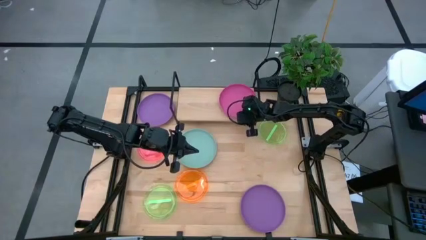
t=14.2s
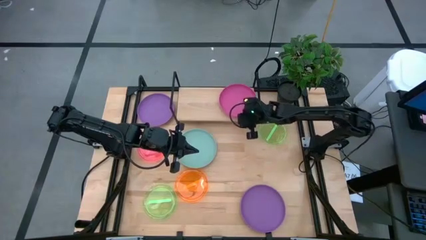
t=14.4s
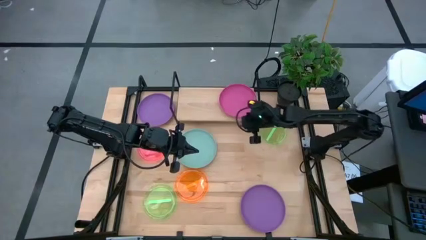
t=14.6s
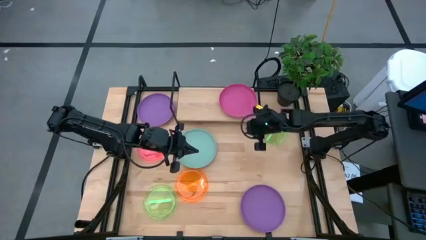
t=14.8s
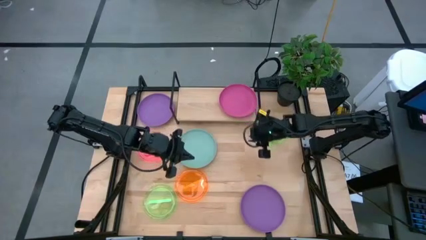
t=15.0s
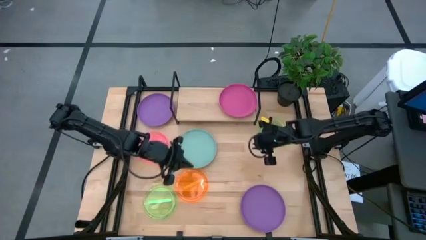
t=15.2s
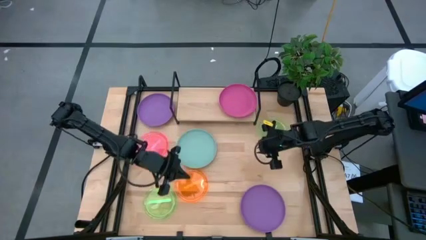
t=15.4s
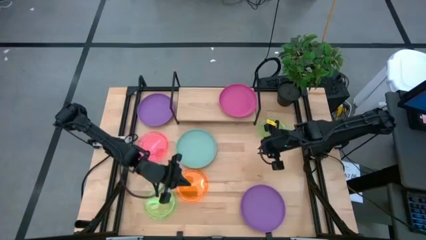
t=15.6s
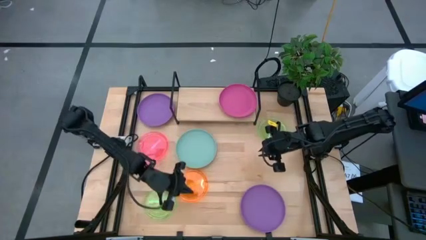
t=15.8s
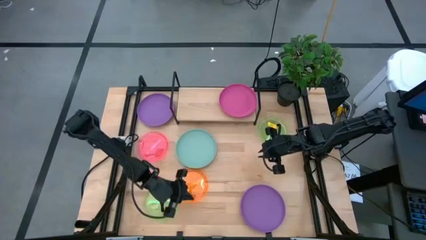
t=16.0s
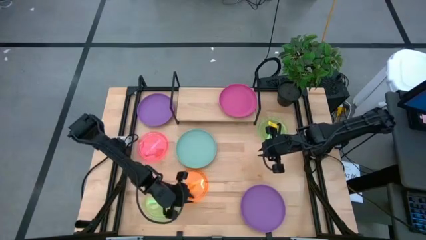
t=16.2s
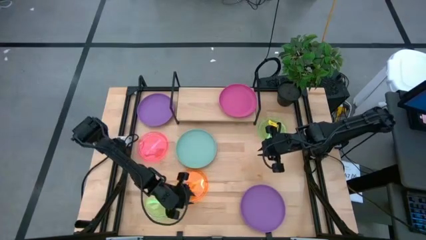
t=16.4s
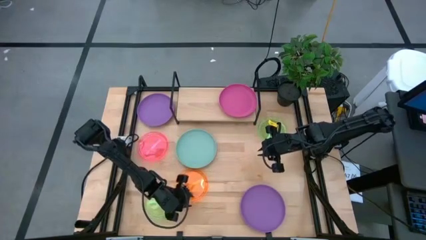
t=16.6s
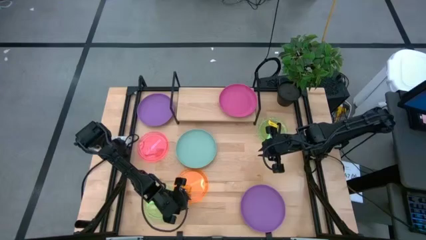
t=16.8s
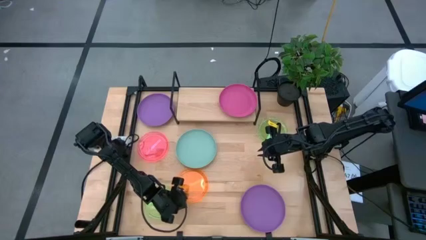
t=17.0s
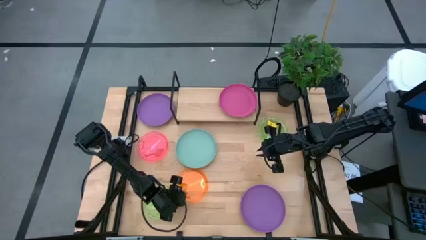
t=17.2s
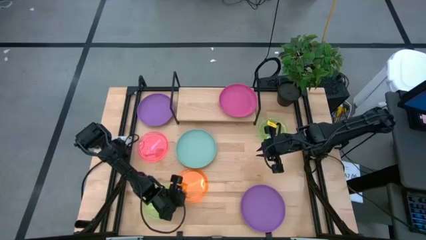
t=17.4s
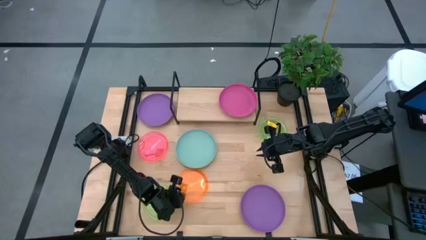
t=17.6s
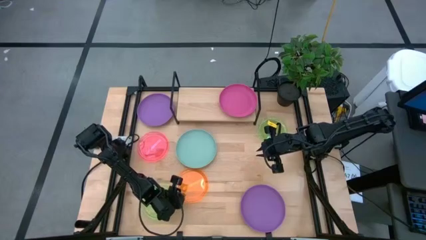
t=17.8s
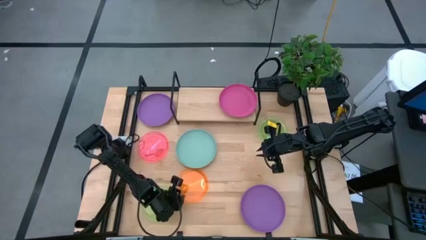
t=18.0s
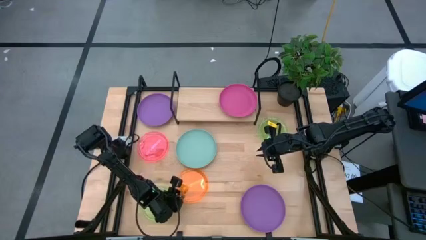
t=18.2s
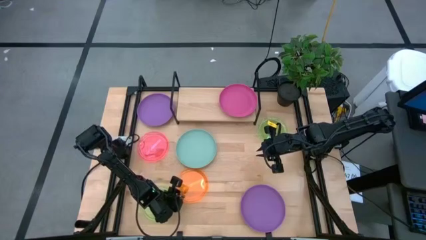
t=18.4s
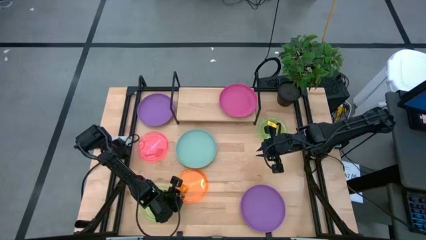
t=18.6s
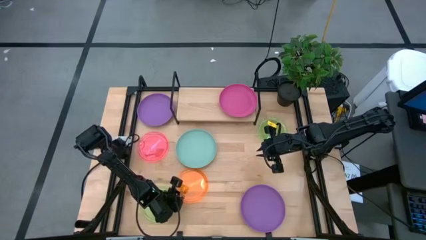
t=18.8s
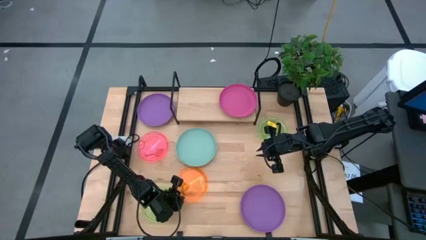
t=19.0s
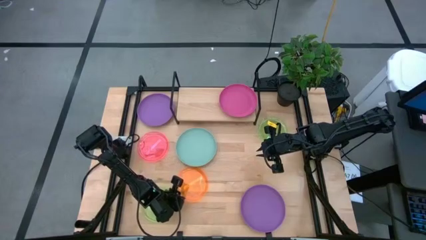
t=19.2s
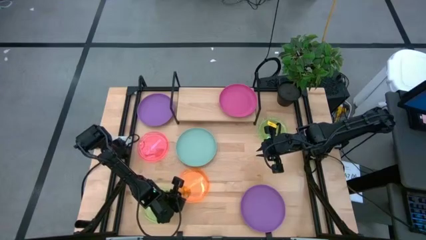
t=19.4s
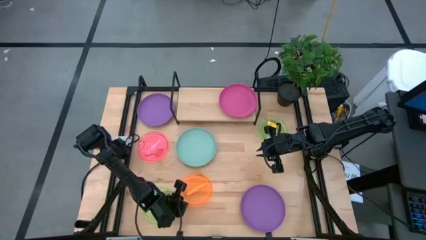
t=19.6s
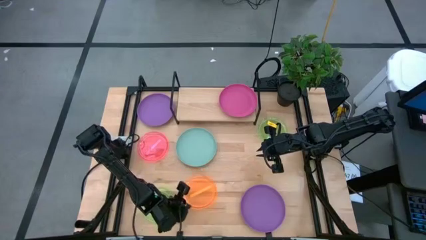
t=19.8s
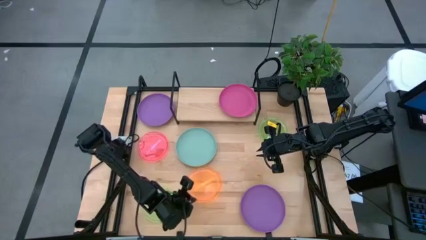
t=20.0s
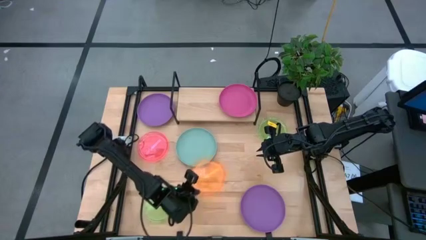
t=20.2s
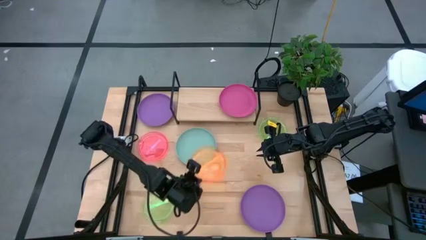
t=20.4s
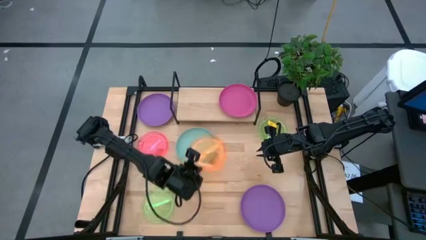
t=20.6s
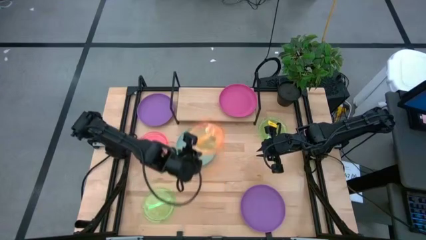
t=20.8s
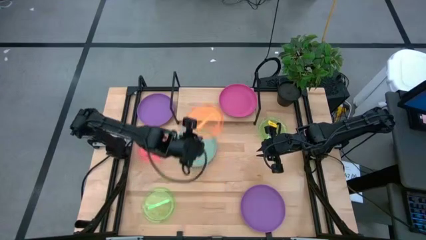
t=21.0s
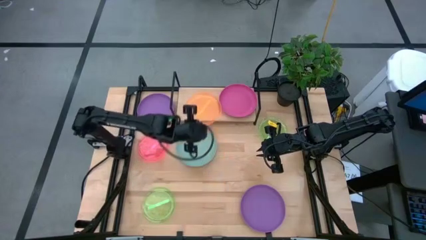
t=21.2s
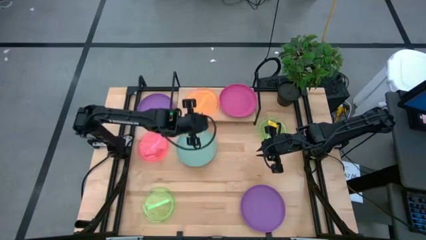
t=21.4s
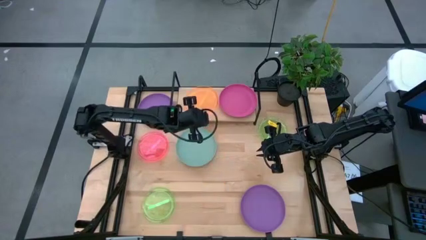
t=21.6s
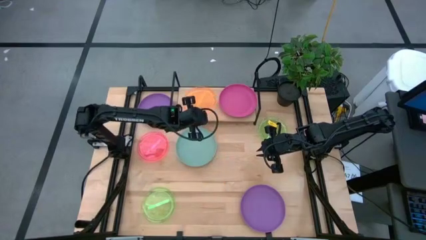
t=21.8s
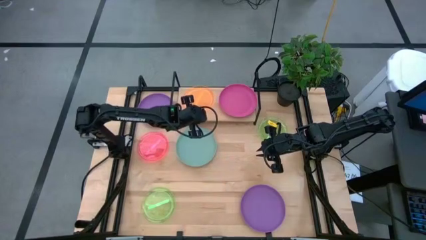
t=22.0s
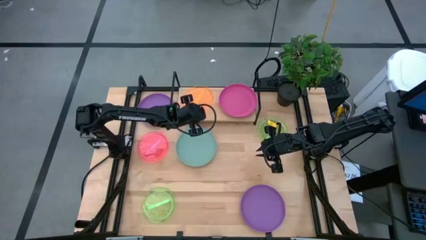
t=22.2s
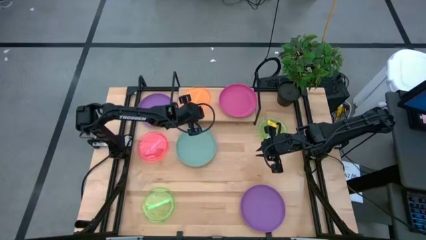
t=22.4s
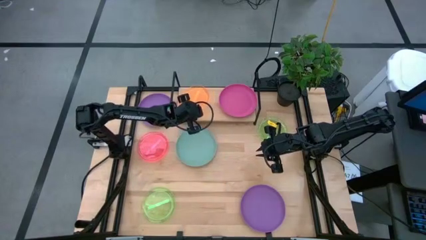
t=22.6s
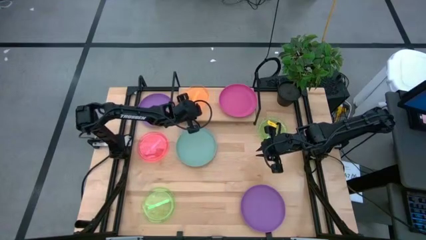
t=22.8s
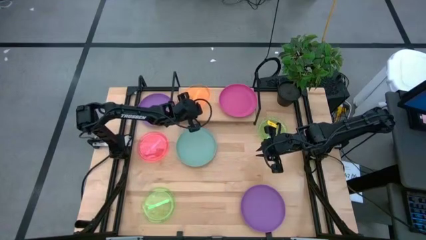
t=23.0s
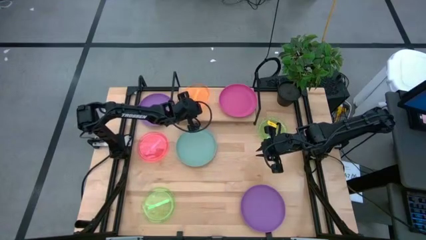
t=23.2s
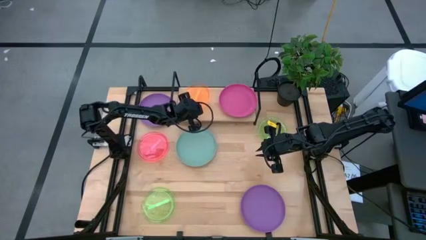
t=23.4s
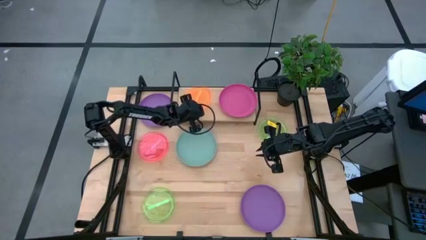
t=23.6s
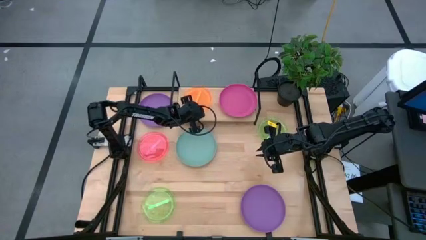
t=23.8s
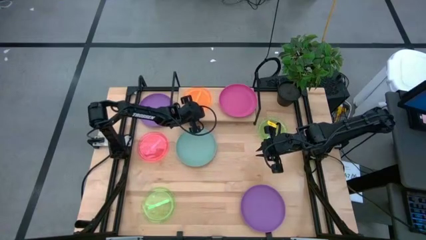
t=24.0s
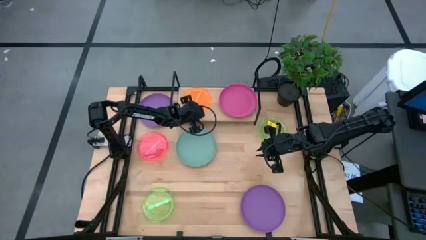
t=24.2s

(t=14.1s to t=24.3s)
Task: Place and stack plates onto a shelf
Put the small orange plate on the shelf
